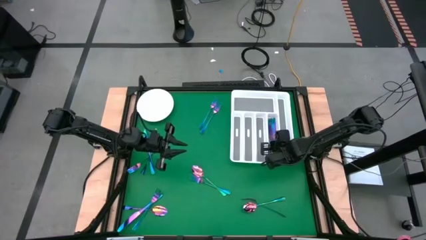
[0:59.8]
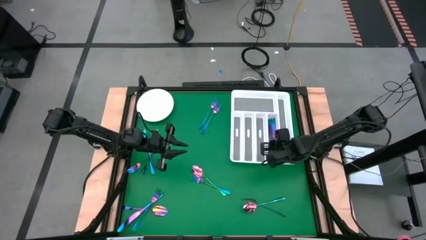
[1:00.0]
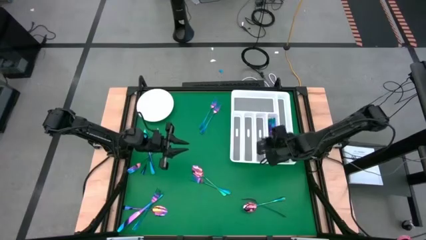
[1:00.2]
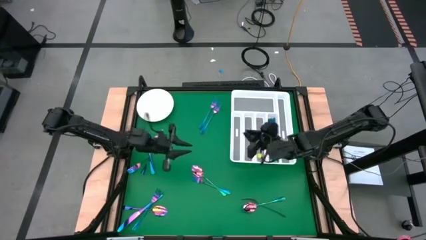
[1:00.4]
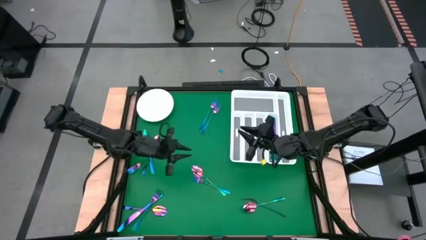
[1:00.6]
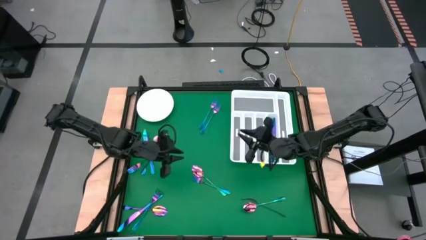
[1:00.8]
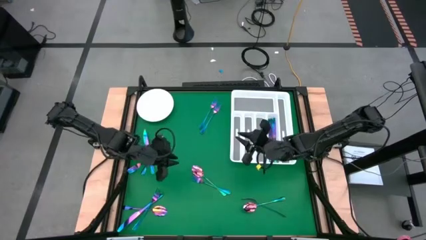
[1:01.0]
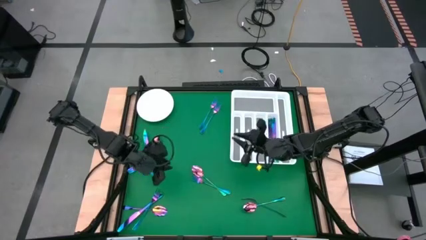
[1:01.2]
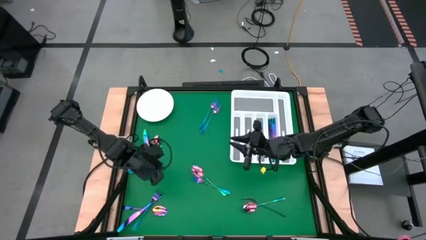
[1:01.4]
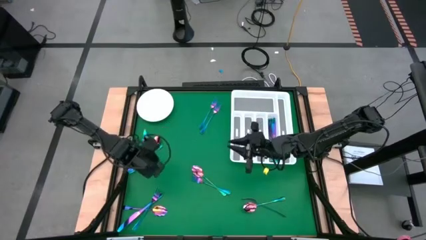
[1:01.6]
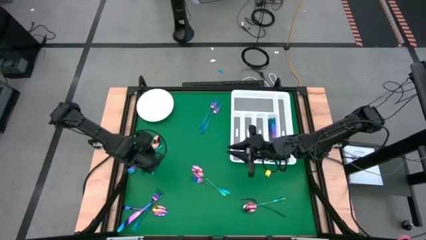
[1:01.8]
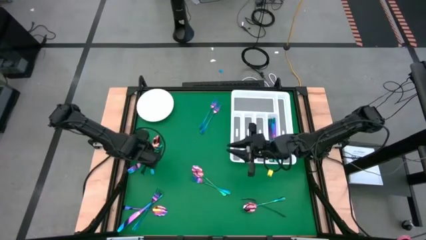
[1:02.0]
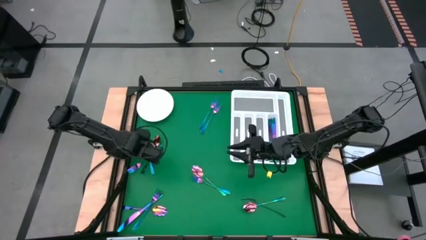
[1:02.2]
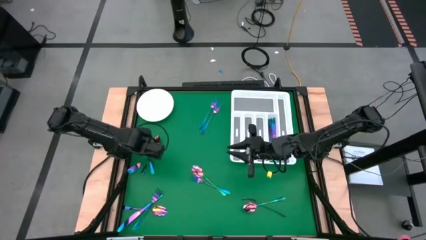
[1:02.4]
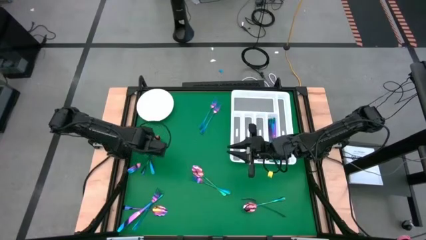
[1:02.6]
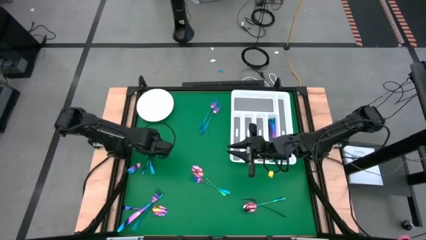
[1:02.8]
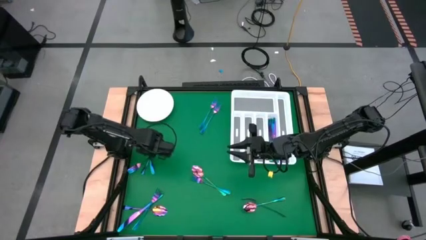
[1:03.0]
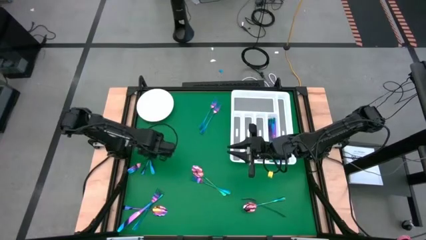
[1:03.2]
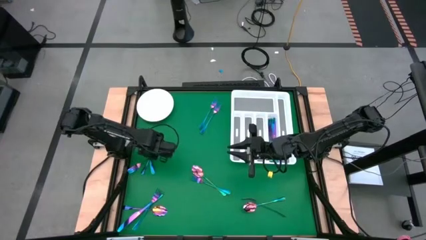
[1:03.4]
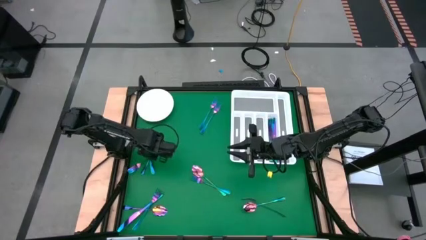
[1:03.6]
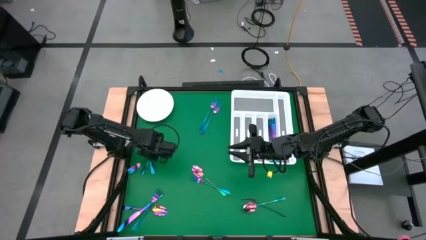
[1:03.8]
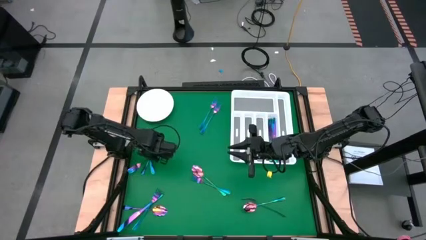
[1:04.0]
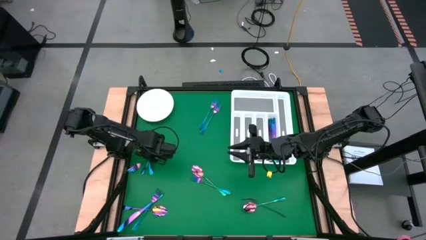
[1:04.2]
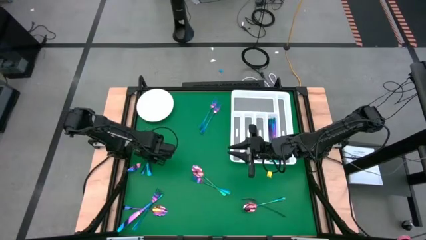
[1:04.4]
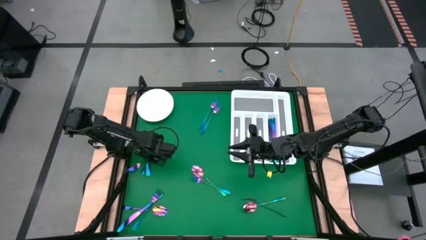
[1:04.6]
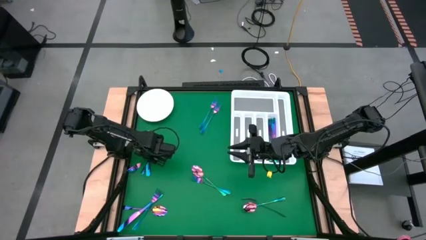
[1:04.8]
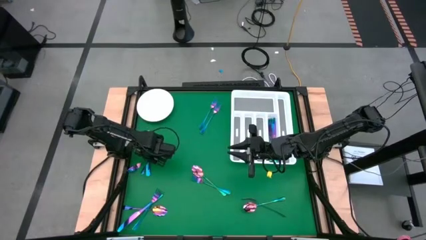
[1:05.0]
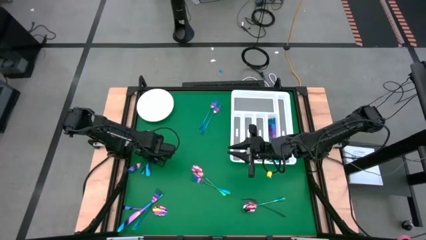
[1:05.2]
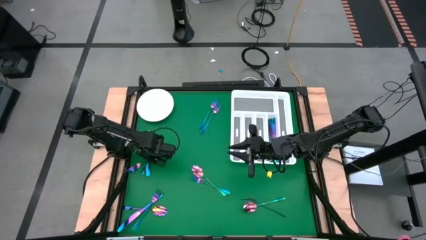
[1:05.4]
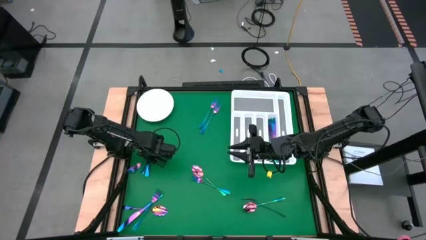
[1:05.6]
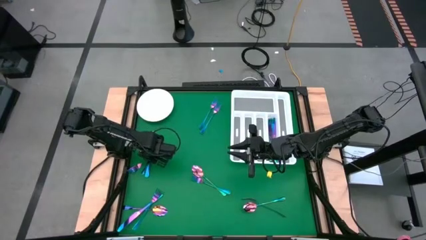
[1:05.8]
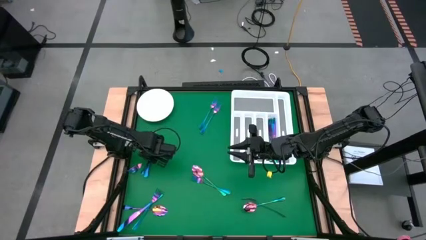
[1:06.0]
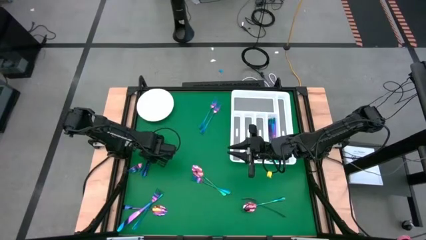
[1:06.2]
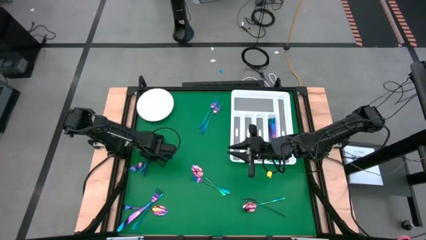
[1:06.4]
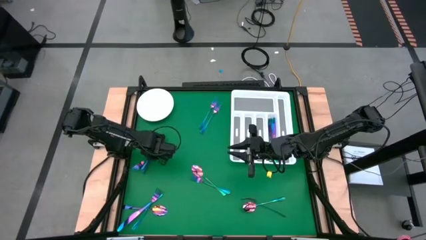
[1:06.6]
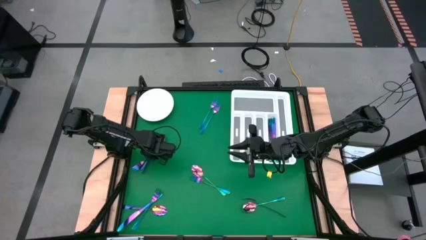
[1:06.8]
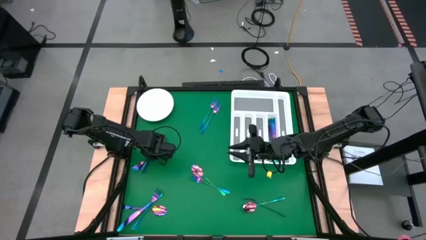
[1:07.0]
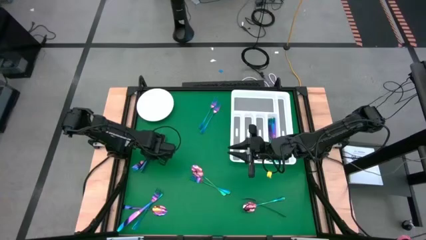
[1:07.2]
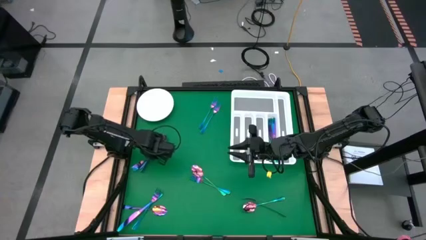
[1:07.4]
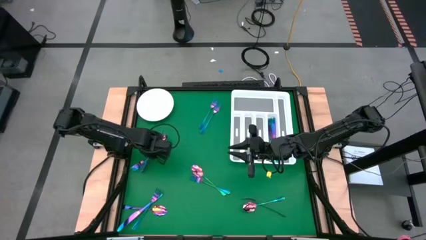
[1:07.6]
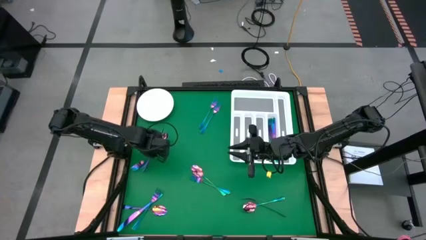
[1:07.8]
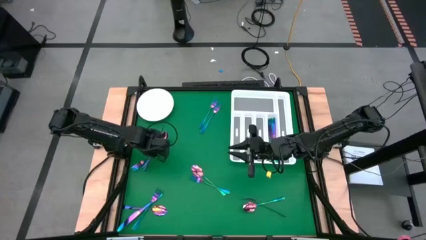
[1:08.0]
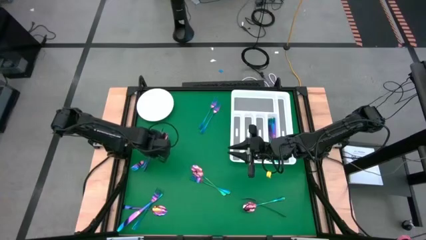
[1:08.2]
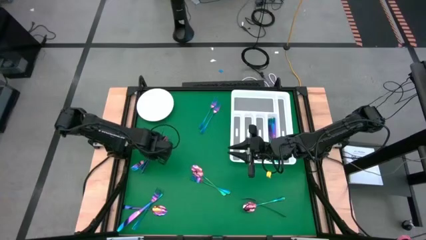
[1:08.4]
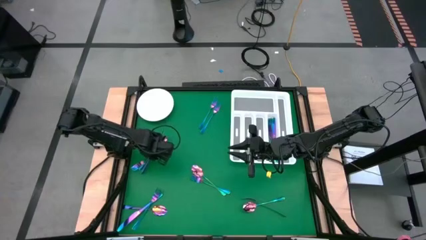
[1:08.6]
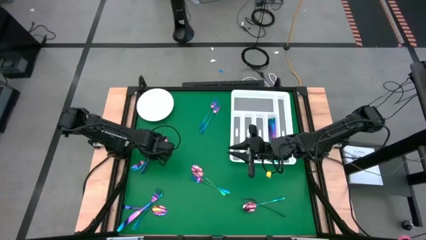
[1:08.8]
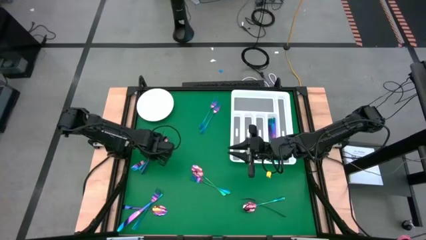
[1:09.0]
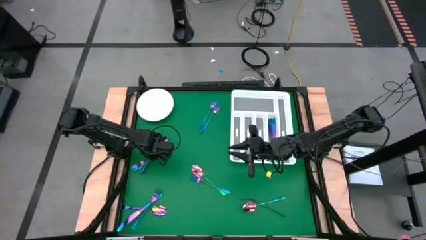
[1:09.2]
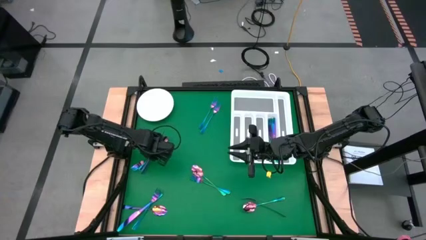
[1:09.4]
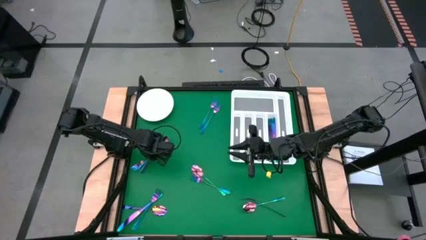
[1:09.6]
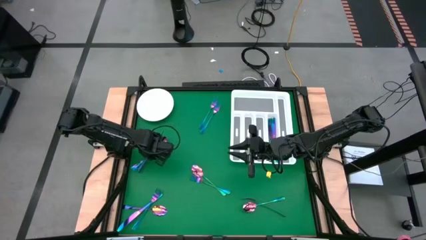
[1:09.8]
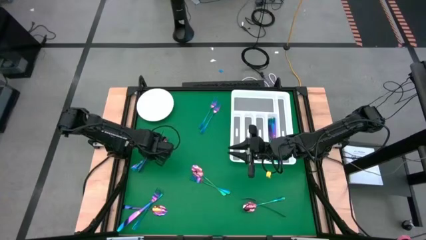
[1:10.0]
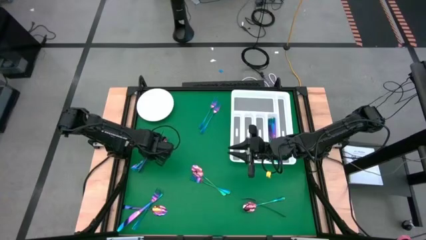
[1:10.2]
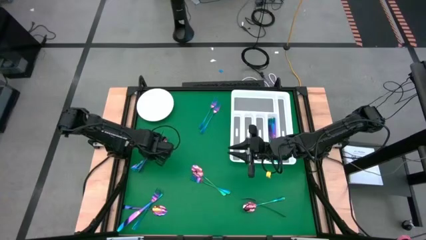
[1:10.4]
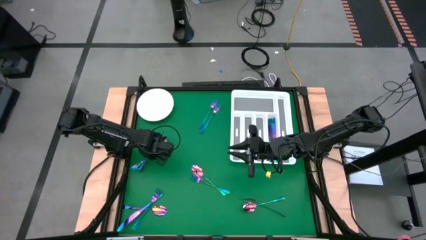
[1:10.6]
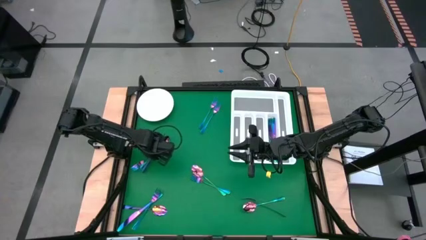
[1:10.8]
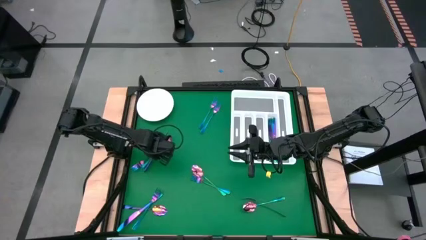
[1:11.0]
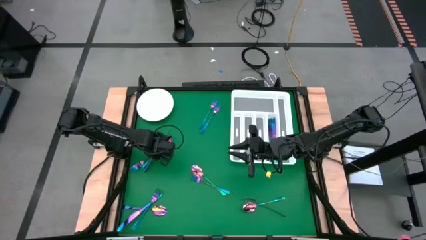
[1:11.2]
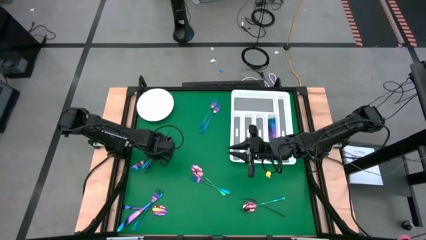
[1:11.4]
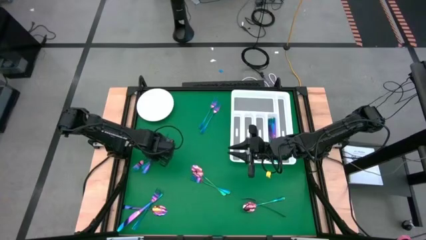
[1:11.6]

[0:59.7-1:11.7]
Task: Sort silverware
Put the blue knife into the white cutlery tray

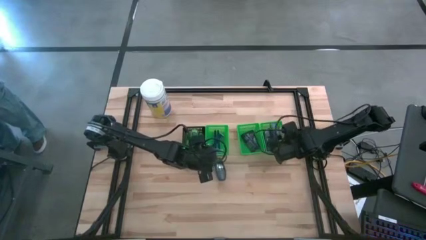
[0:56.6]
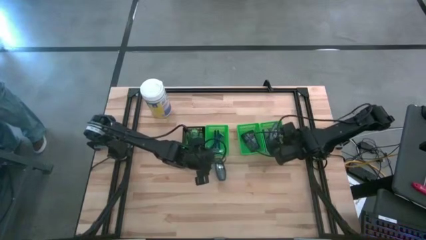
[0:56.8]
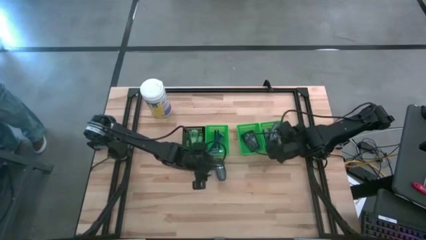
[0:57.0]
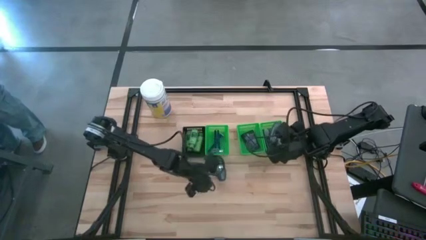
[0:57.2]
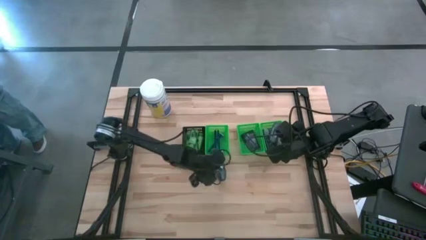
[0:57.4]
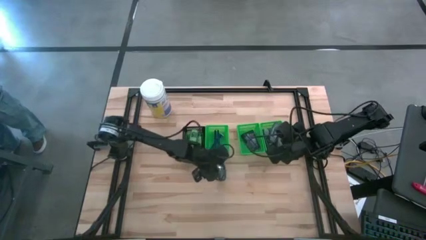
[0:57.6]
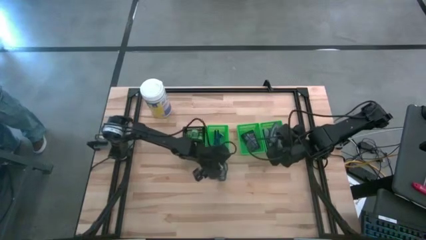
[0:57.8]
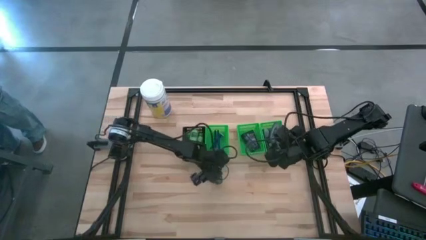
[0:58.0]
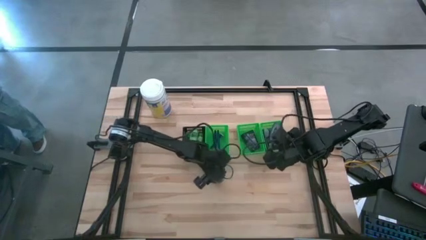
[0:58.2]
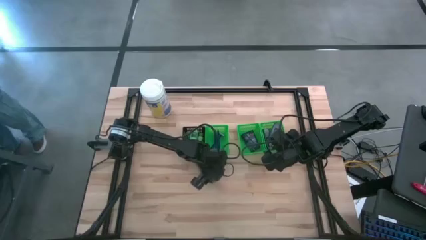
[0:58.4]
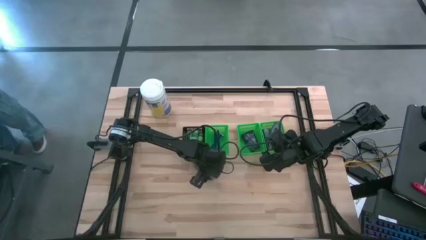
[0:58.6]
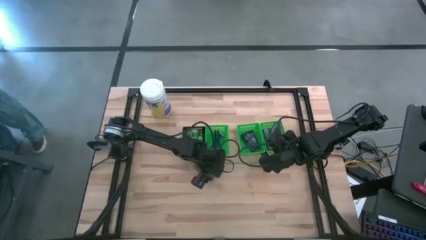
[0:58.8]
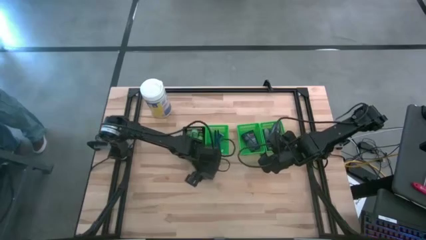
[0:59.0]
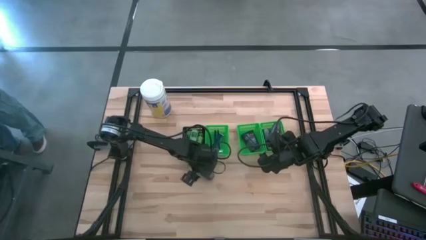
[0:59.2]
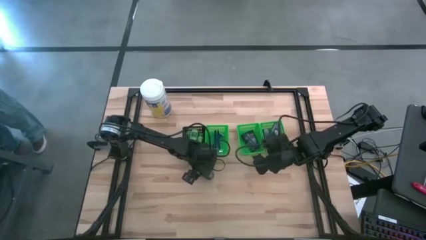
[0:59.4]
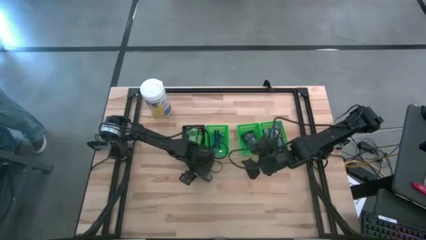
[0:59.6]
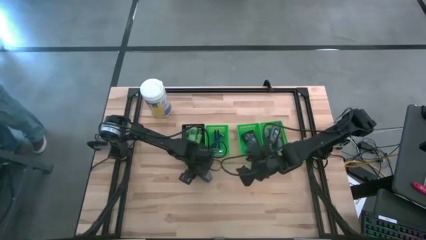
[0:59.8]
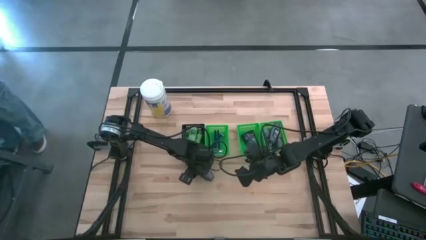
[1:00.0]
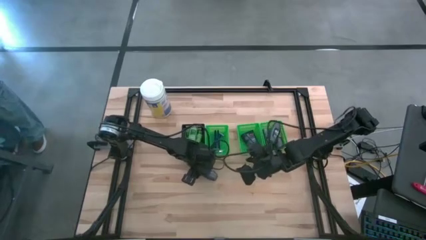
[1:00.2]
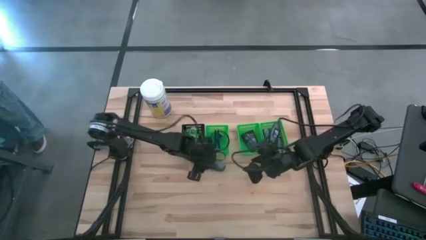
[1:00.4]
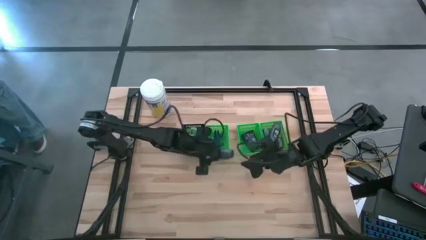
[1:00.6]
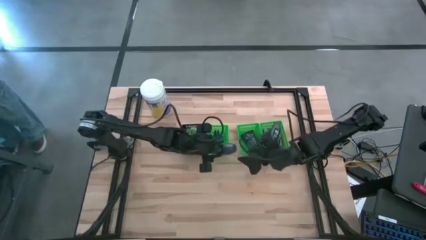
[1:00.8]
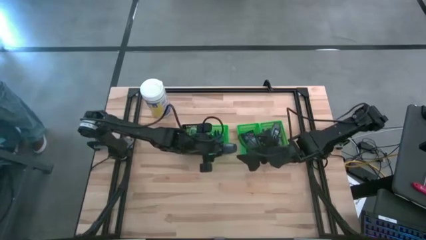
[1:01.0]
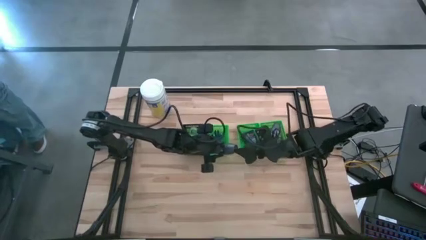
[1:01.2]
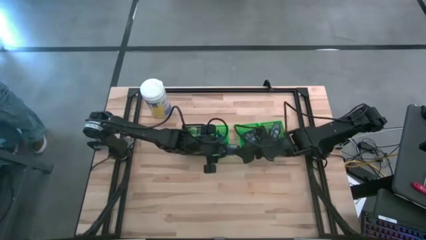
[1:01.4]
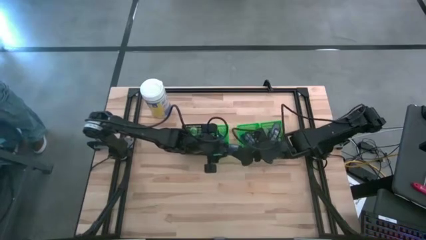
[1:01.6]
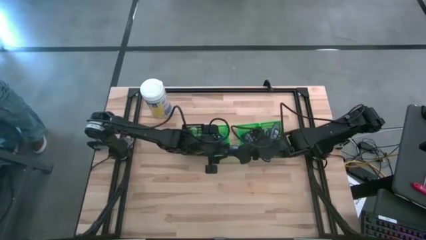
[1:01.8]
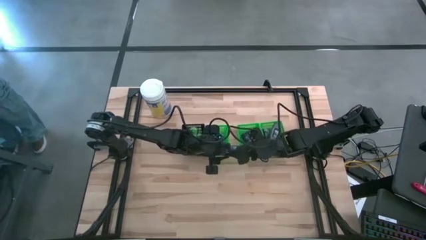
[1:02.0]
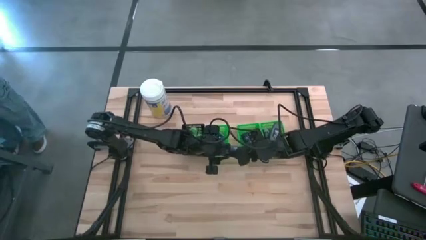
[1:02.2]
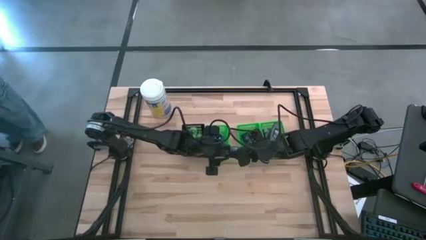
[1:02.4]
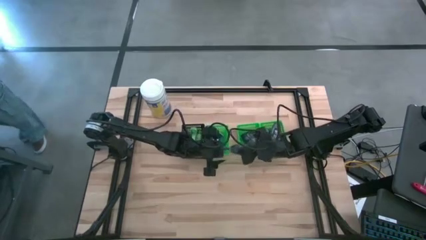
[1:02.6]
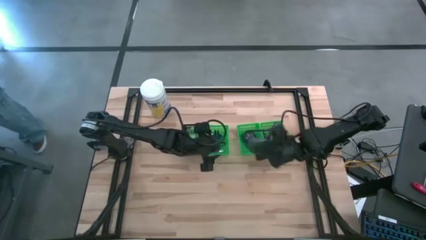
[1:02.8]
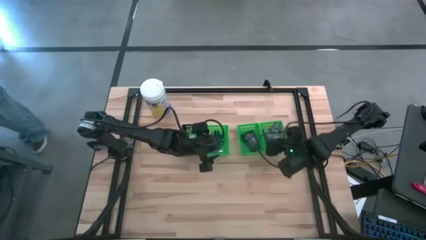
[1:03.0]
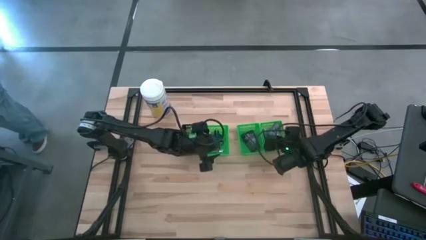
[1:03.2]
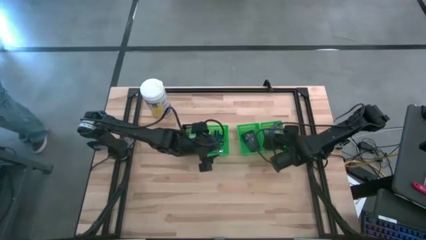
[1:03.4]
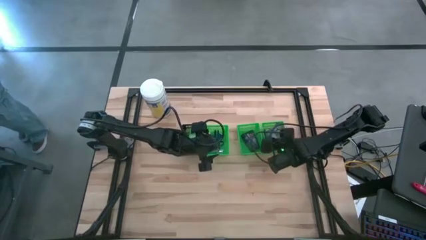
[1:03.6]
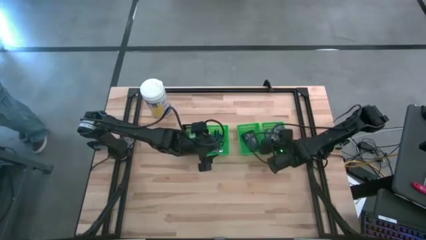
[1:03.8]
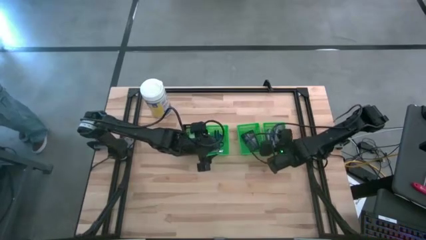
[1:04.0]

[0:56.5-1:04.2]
Task: Pick & Place Travel size toiletries
Put the black deodorant into the right green bin
